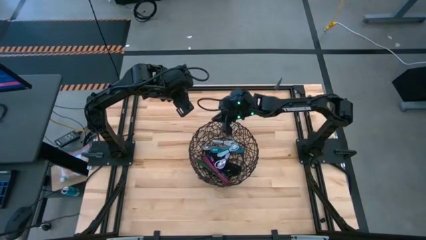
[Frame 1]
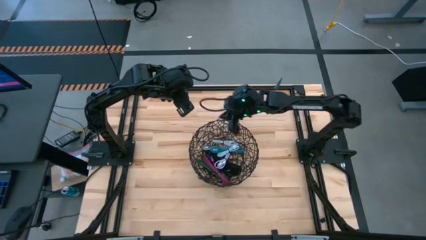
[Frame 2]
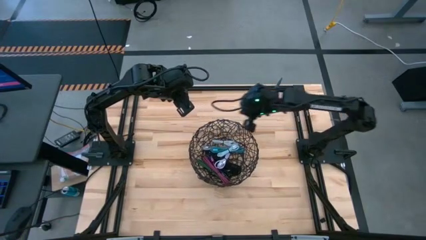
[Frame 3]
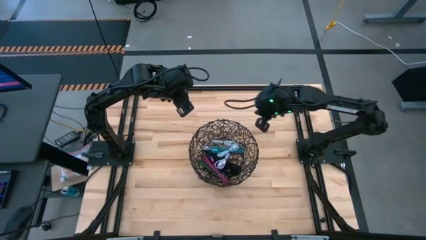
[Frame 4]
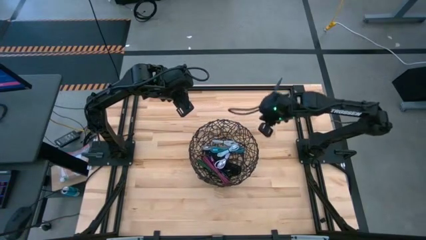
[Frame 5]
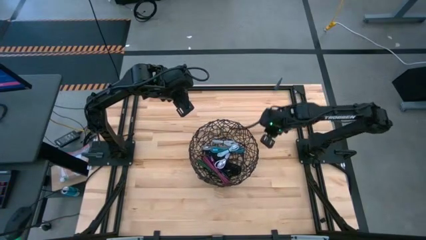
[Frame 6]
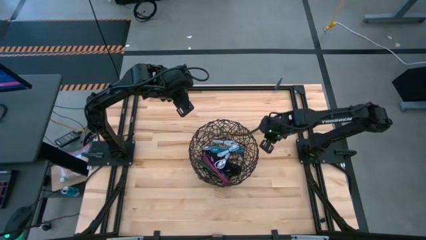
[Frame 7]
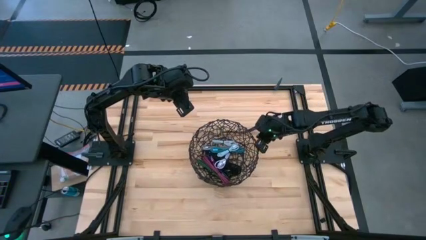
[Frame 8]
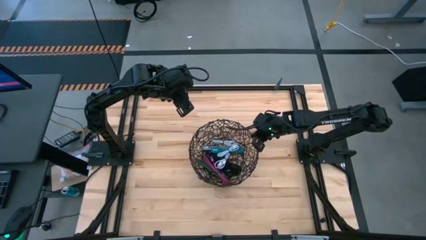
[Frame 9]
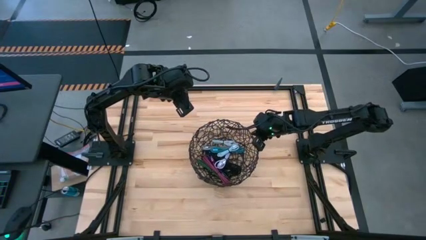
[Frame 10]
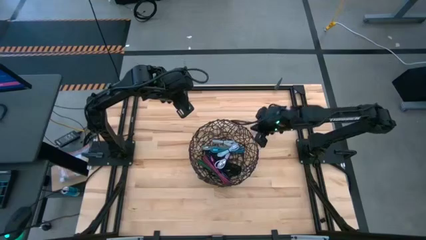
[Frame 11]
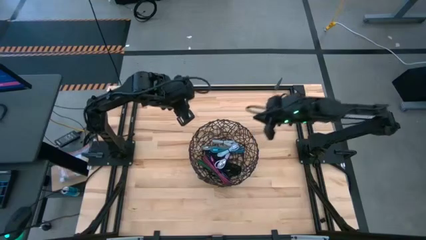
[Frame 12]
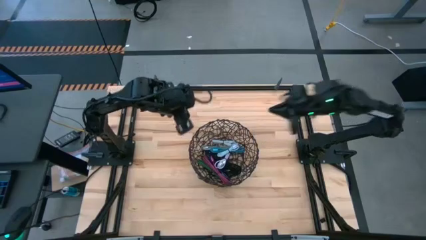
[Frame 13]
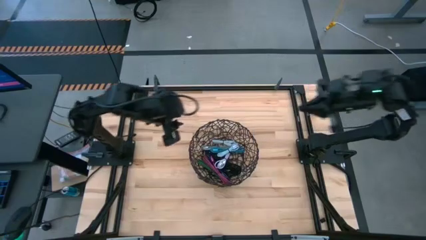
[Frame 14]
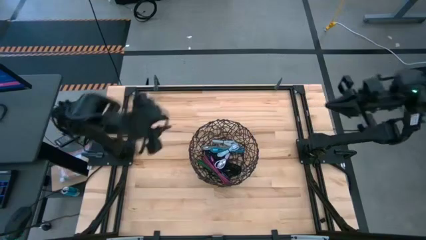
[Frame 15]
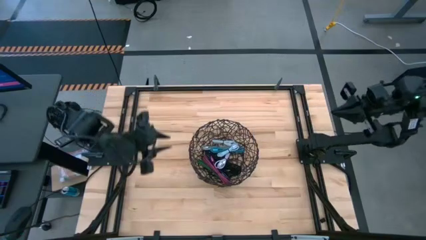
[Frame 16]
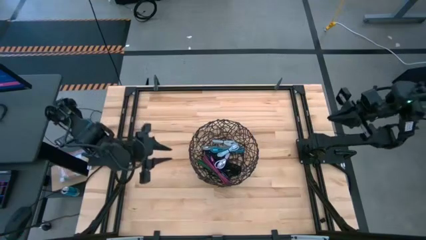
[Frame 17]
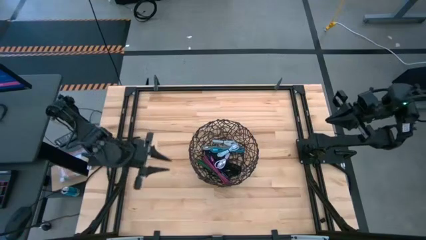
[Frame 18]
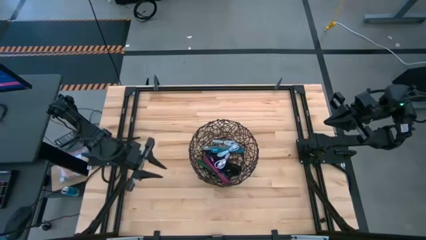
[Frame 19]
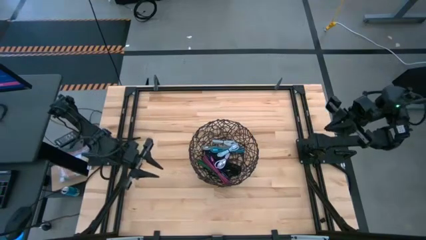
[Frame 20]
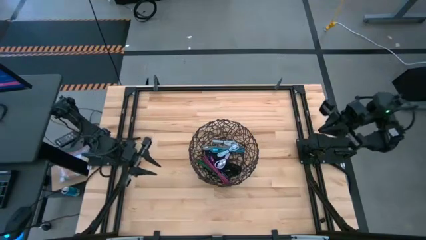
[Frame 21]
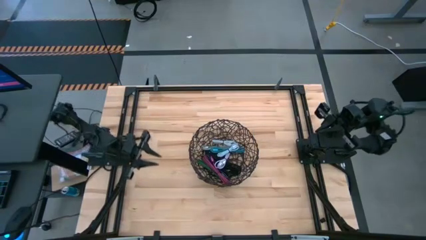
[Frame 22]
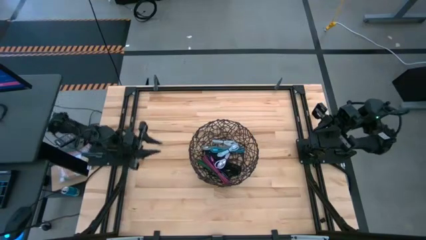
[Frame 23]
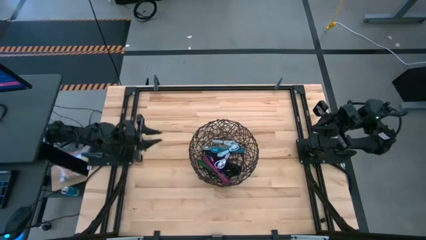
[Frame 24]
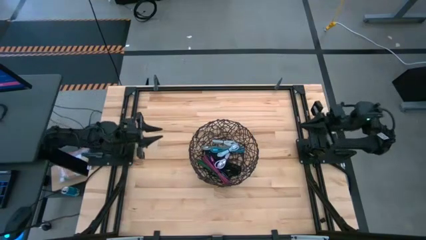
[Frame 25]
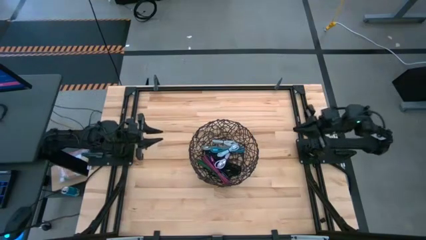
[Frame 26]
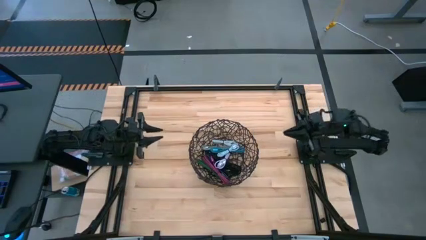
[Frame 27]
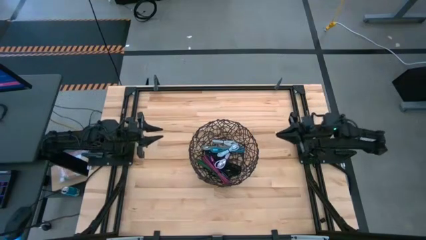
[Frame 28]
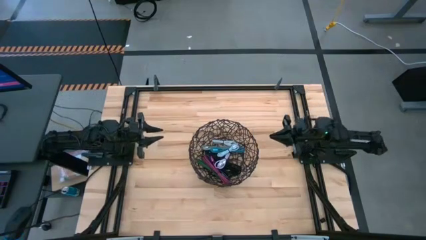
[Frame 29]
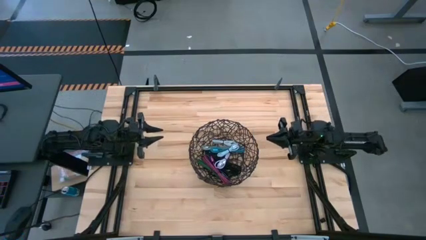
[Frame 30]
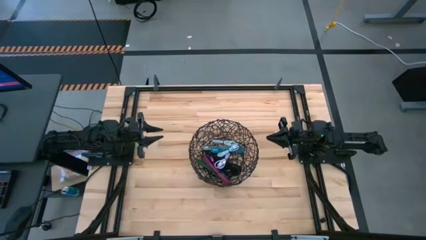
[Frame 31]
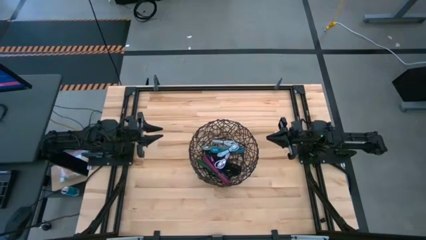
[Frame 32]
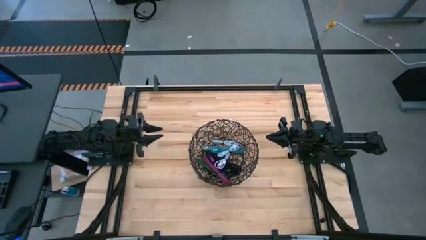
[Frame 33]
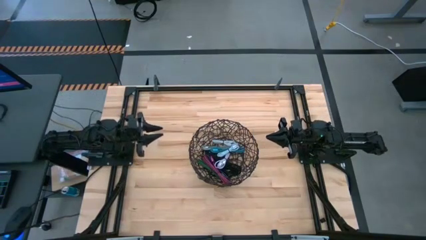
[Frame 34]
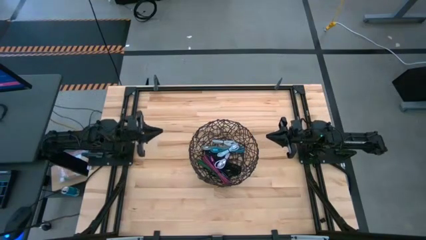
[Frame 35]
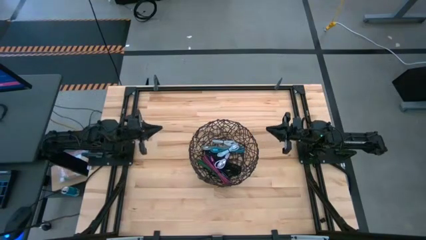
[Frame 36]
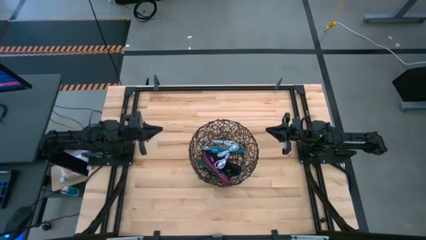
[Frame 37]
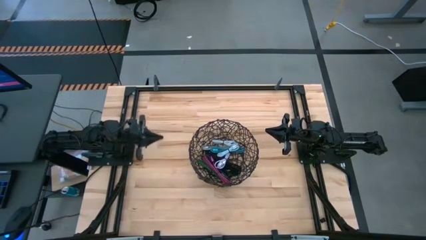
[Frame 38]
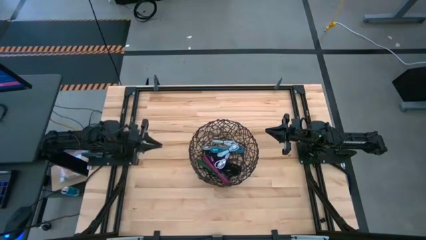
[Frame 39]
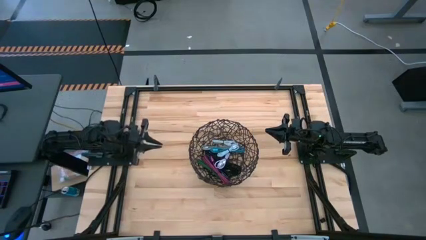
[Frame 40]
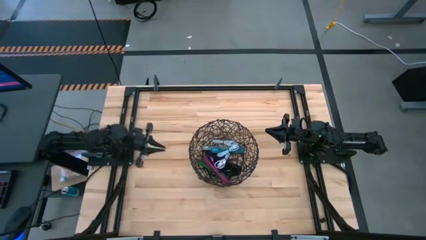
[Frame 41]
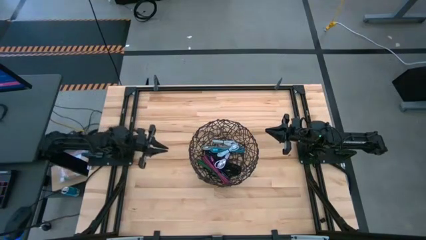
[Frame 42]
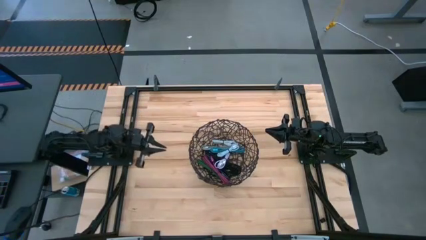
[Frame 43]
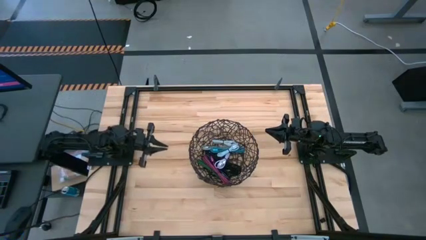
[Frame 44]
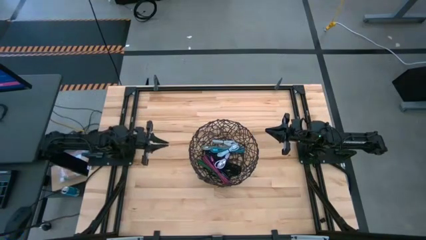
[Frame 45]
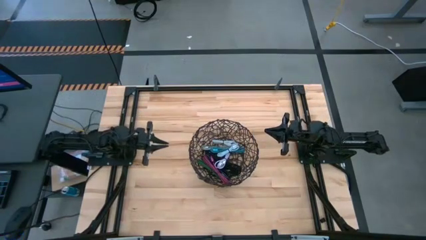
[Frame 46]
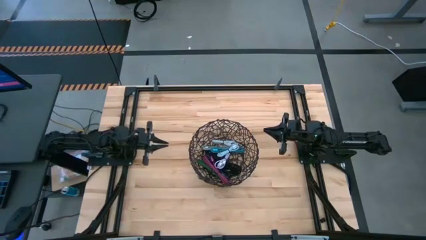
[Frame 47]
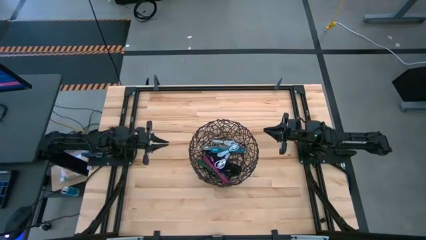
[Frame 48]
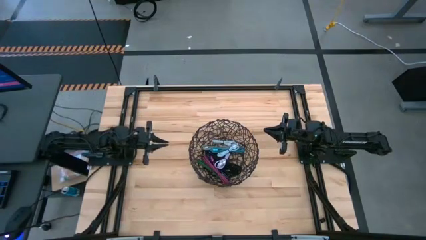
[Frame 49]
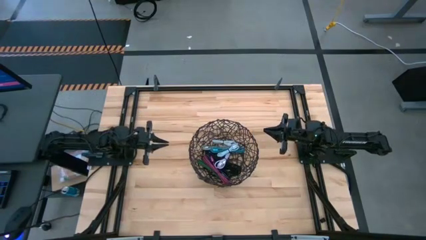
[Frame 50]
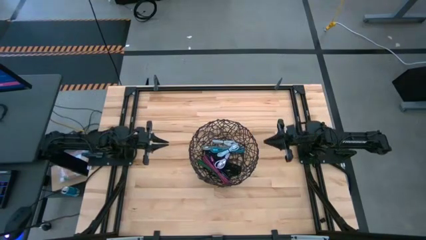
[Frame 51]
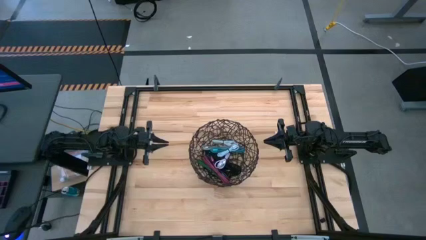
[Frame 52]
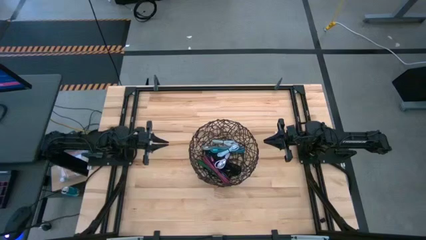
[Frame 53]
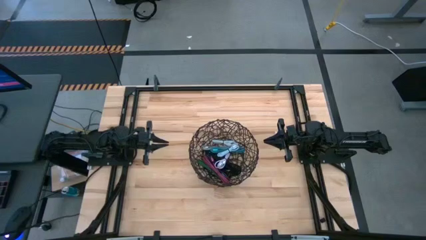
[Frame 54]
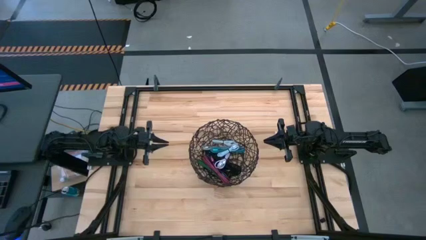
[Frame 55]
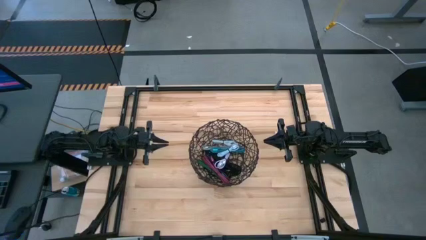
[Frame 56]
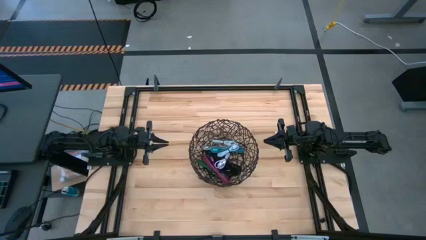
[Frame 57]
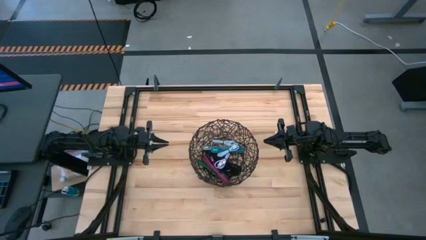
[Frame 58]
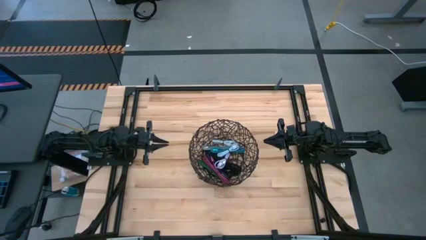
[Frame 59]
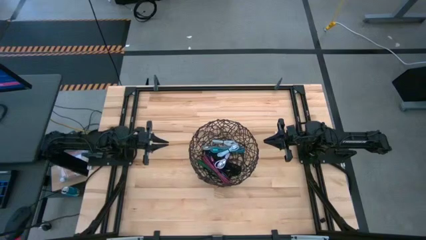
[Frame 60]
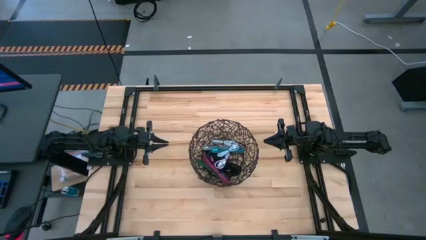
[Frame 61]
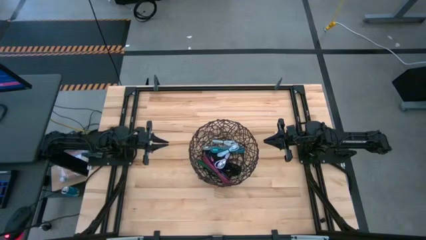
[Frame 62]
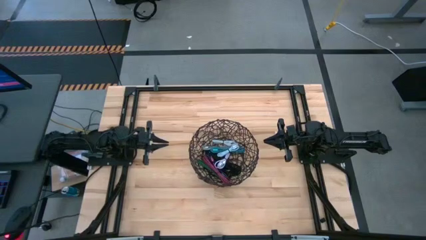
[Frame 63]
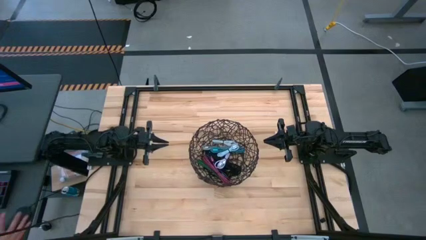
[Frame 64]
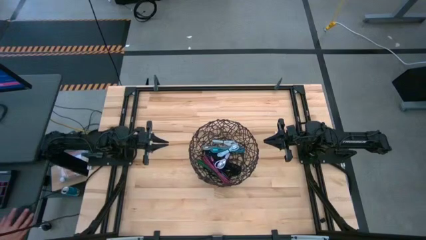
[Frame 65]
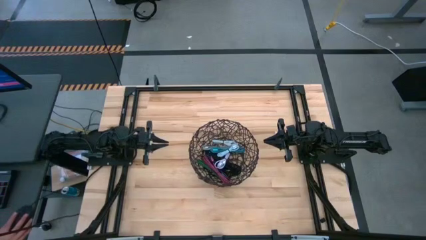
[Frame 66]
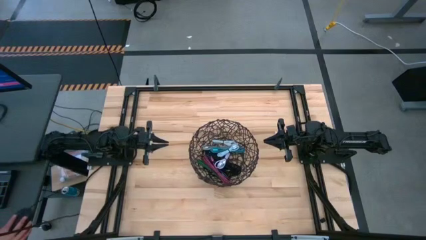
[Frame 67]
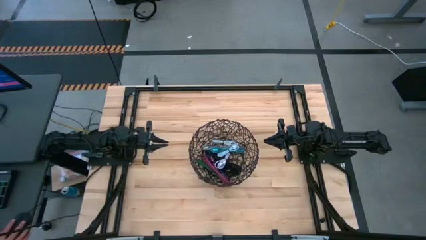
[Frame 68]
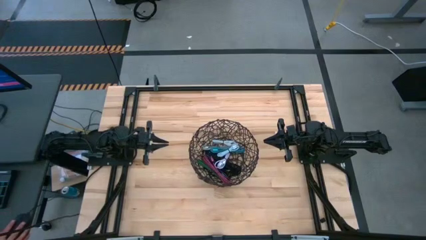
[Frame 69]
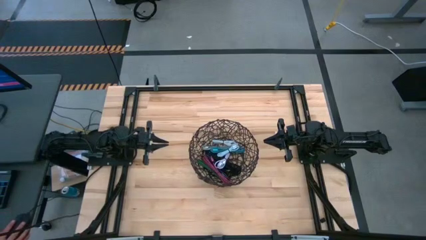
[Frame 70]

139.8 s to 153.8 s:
Task: Pick and place USB-C Cables
Return to Home Position

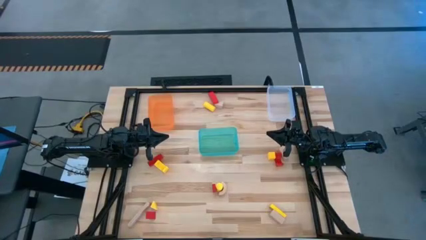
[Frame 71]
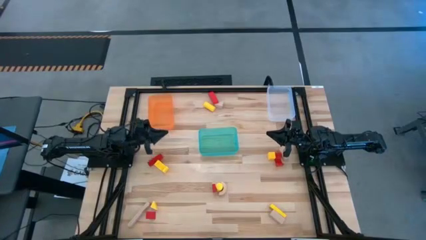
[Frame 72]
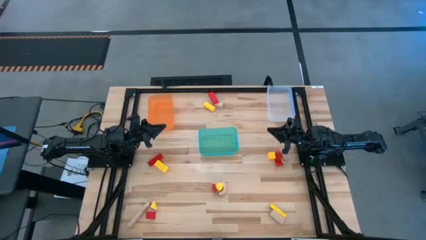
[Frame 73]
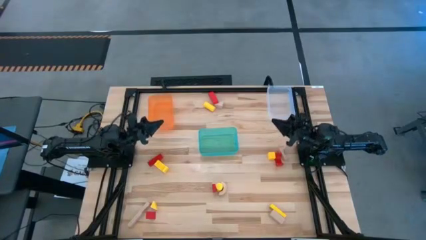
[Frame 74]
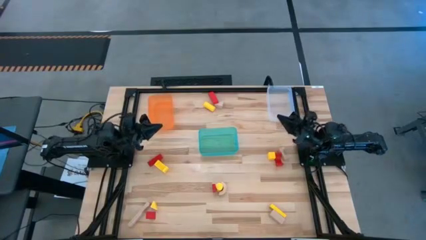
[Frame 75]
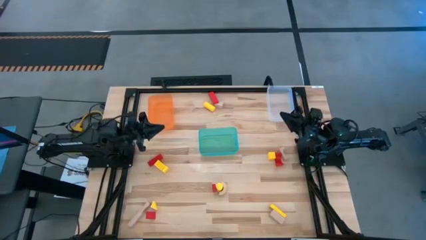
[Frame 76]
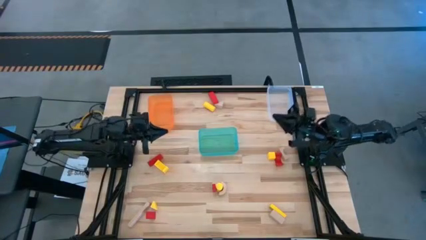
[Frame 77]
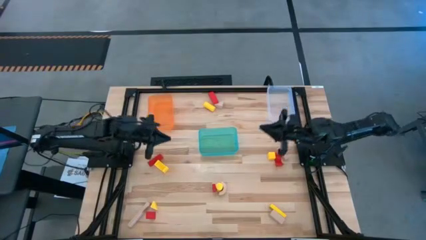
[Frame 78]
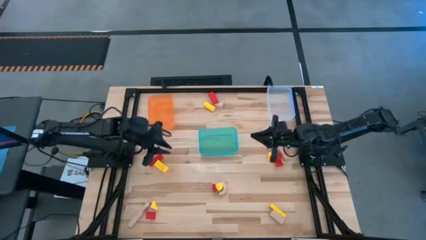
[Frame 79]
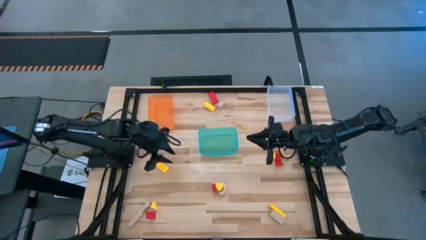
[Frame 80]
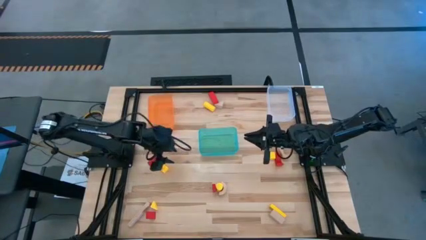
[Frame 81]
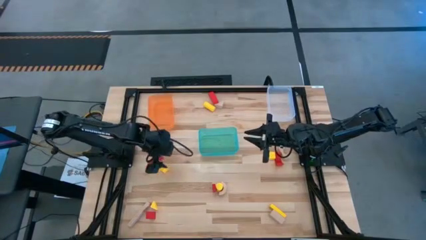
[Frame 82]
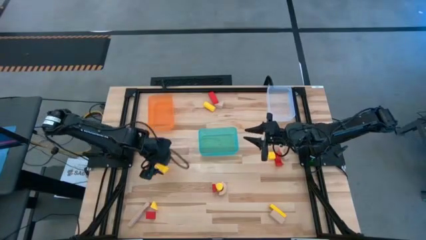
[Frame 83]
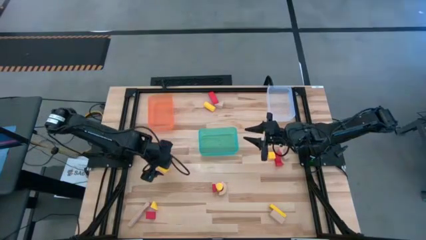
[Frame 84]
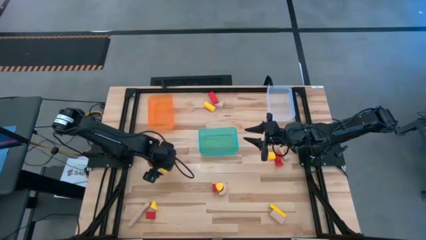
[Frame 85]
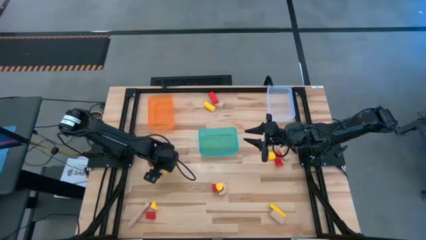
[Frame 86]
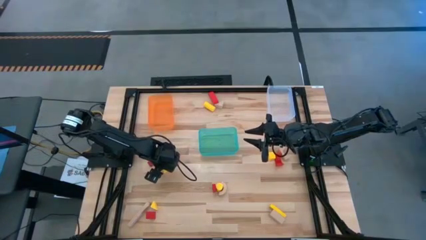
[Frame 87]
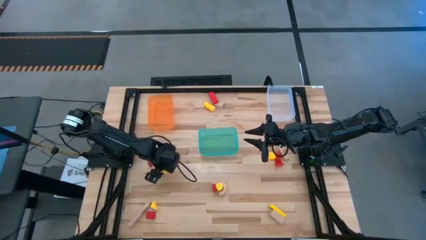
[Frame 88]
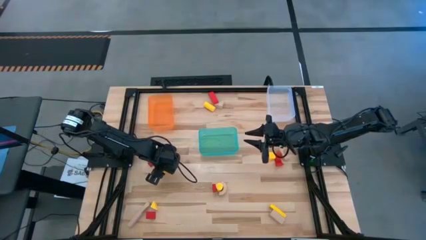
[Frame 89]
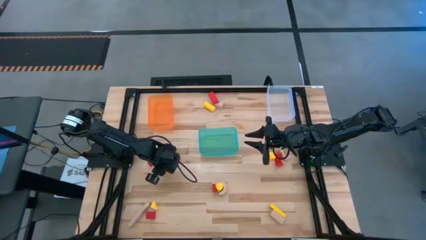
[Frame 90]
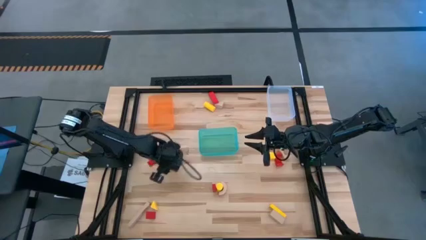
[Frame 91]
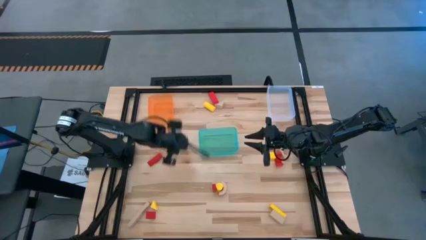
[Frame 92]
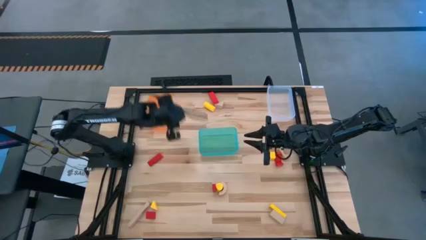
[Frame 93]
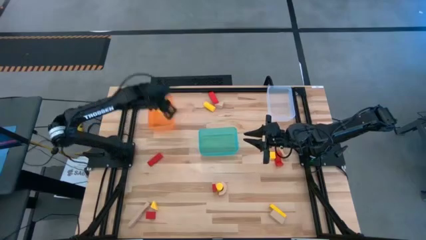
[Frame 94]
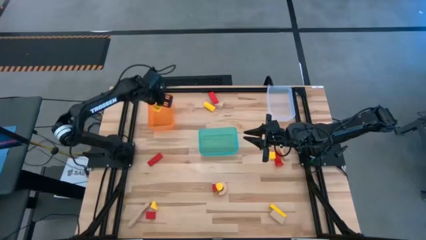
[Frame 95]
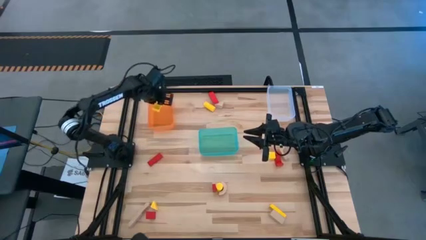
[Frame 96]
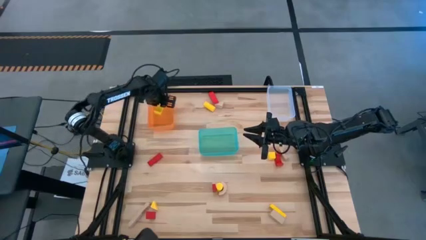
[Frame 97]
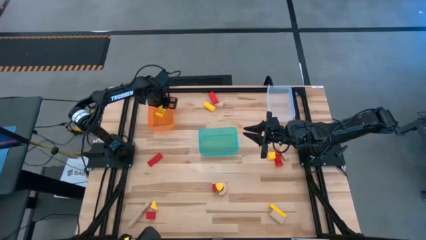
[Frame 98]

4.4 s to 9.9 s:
Task: Sort & place blocks by color
Put the yellow block into the orange bin
